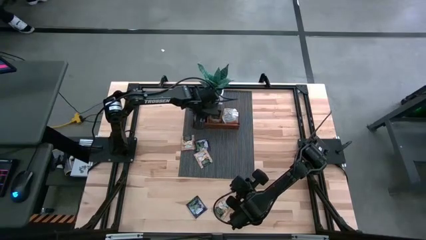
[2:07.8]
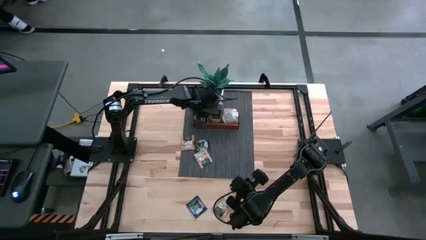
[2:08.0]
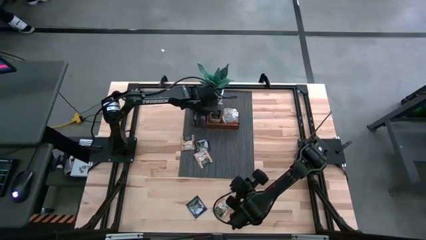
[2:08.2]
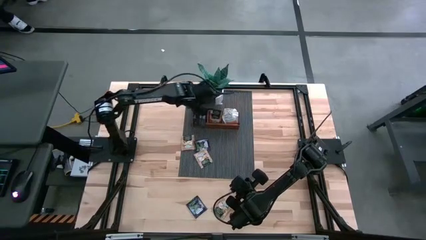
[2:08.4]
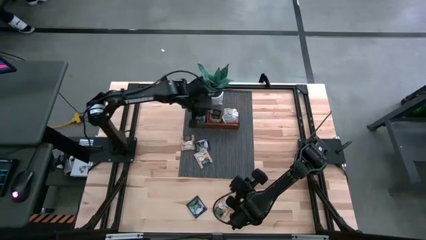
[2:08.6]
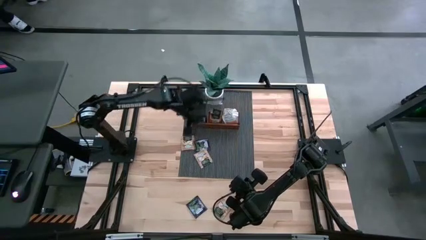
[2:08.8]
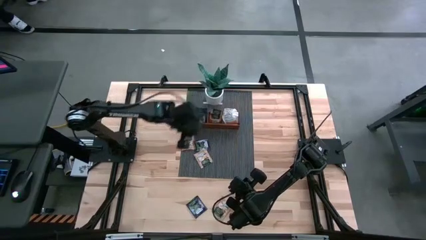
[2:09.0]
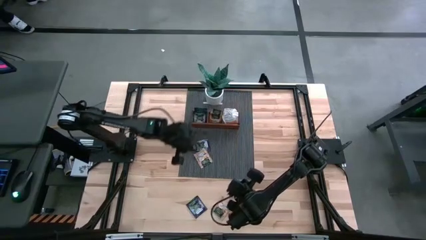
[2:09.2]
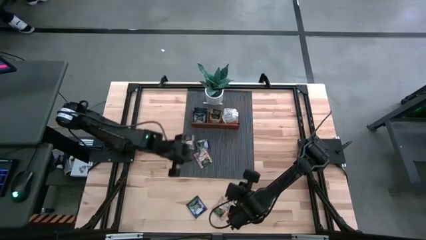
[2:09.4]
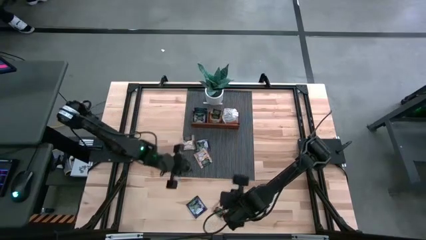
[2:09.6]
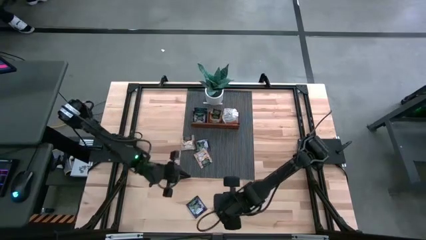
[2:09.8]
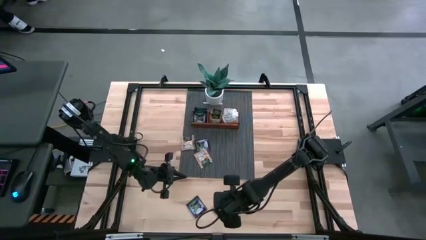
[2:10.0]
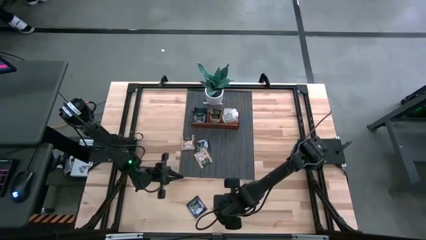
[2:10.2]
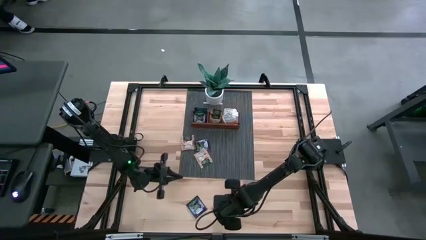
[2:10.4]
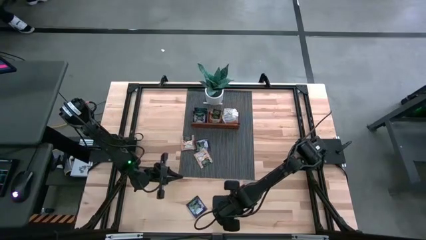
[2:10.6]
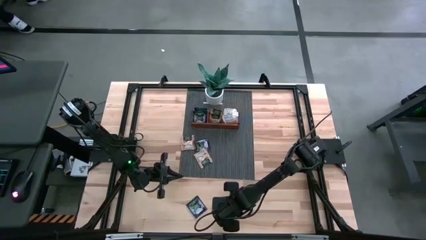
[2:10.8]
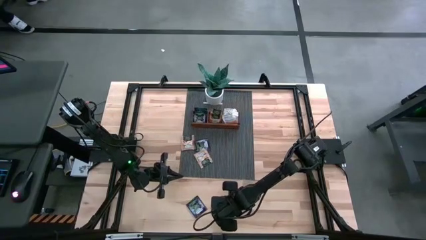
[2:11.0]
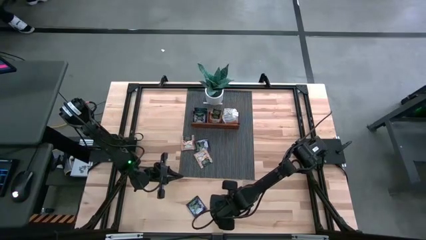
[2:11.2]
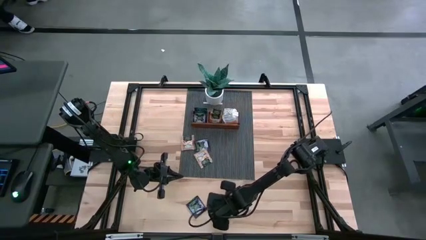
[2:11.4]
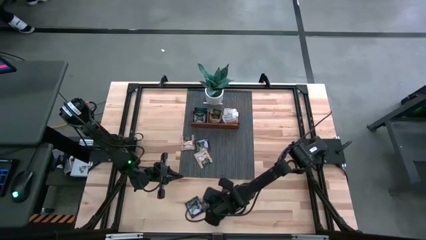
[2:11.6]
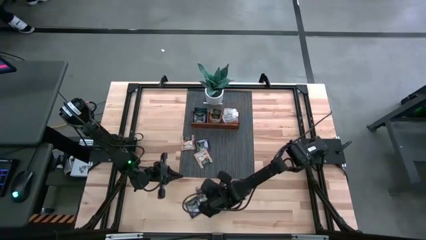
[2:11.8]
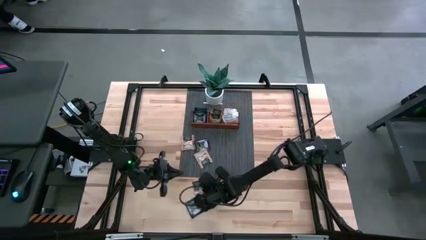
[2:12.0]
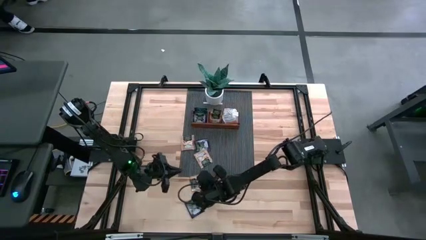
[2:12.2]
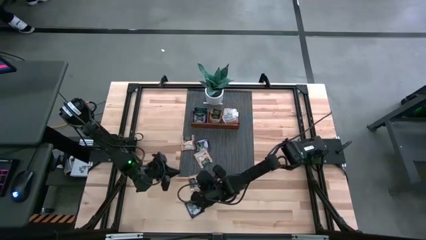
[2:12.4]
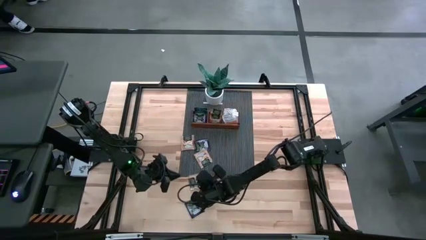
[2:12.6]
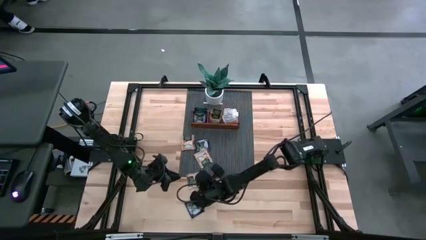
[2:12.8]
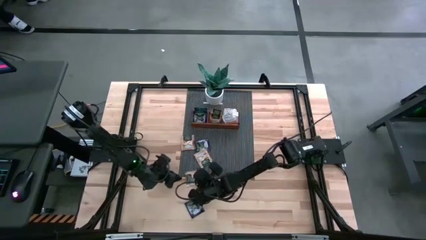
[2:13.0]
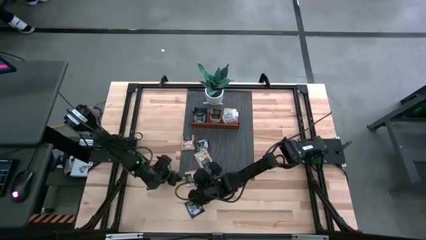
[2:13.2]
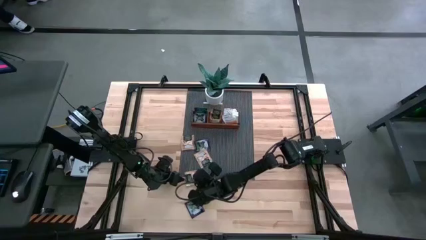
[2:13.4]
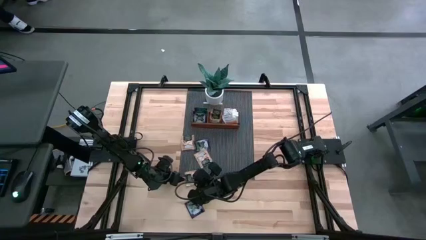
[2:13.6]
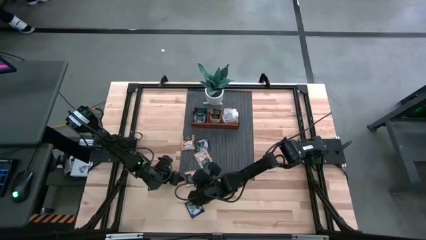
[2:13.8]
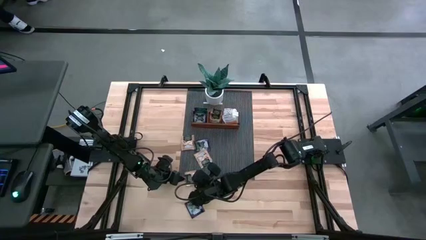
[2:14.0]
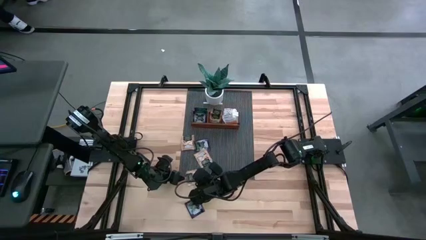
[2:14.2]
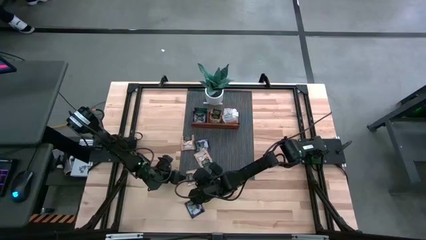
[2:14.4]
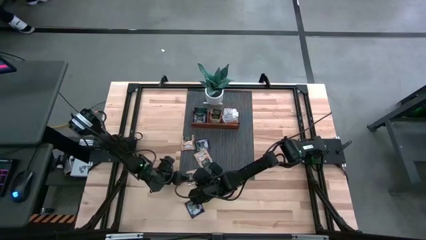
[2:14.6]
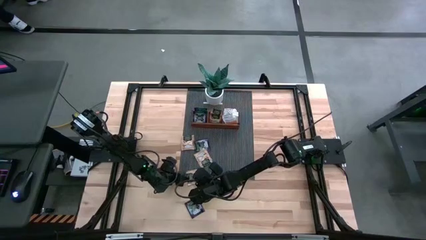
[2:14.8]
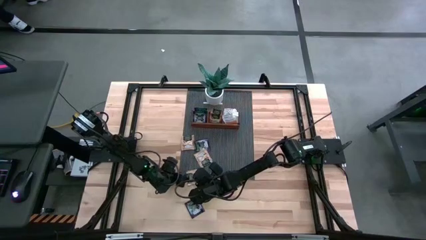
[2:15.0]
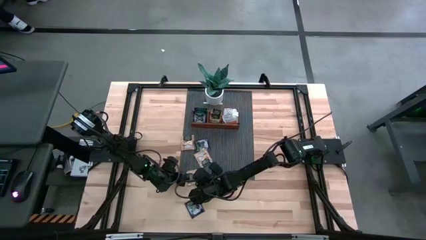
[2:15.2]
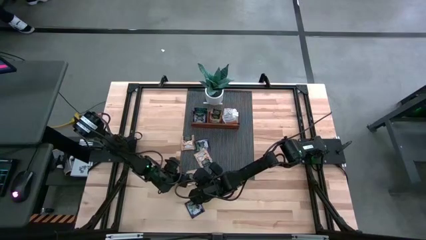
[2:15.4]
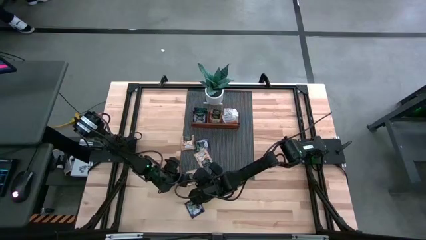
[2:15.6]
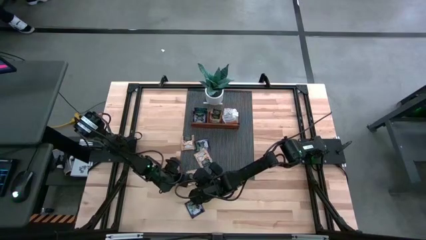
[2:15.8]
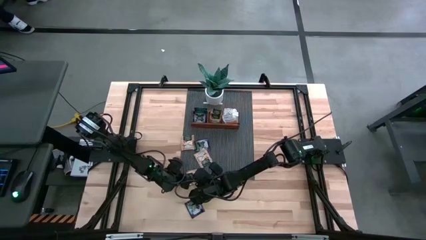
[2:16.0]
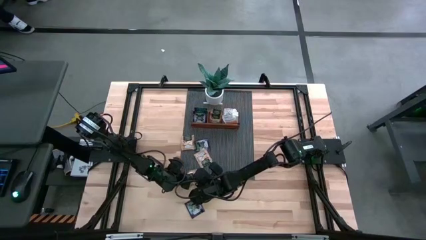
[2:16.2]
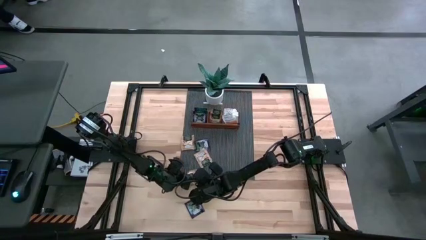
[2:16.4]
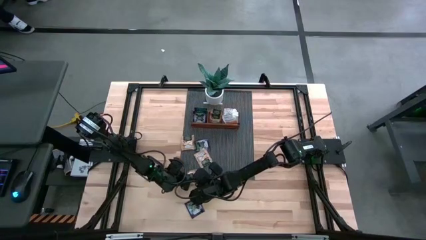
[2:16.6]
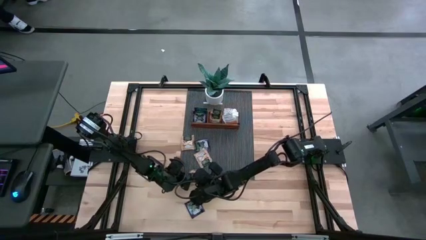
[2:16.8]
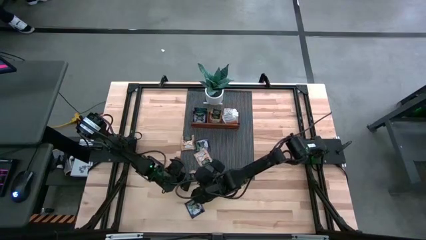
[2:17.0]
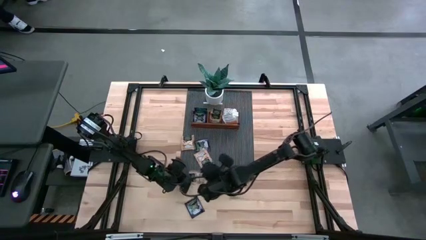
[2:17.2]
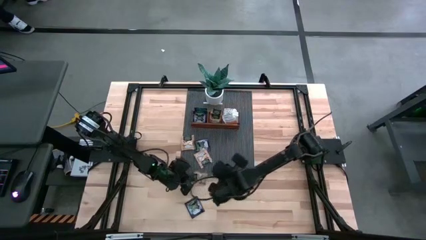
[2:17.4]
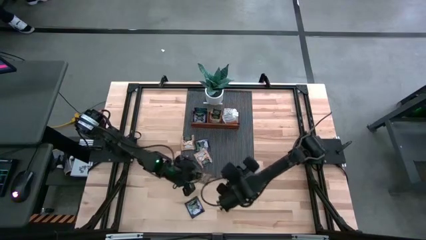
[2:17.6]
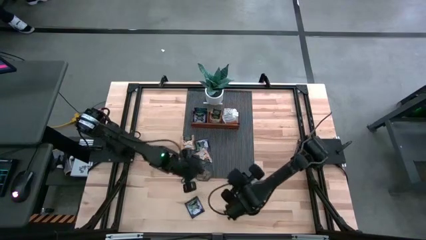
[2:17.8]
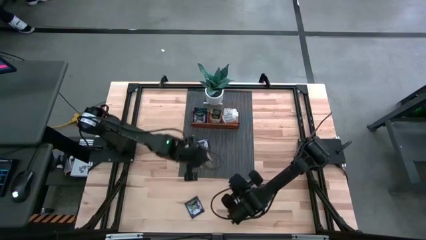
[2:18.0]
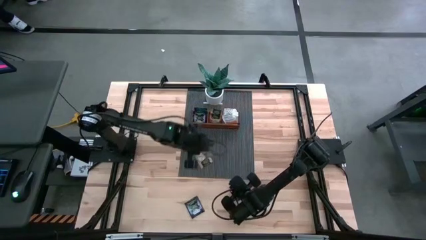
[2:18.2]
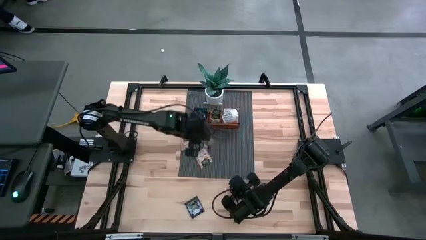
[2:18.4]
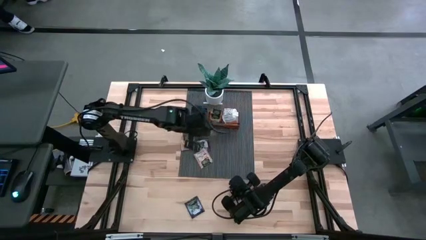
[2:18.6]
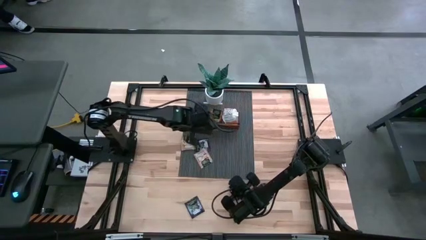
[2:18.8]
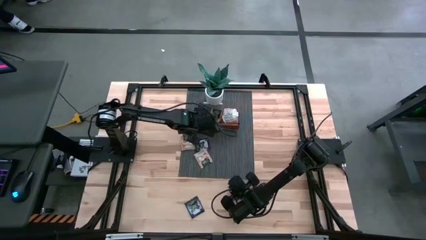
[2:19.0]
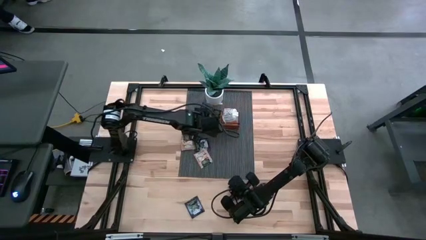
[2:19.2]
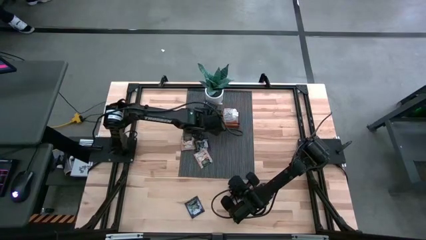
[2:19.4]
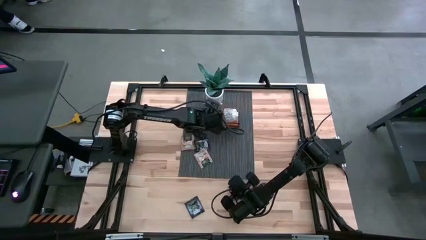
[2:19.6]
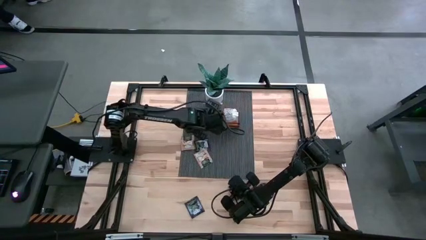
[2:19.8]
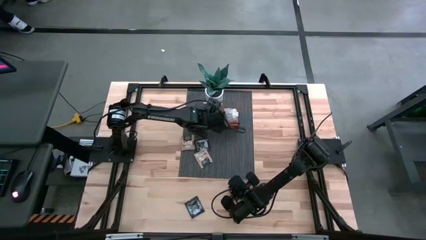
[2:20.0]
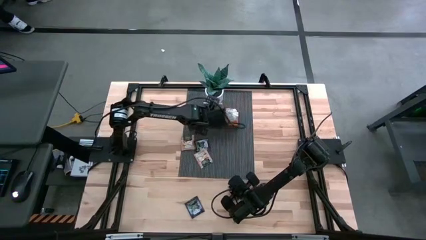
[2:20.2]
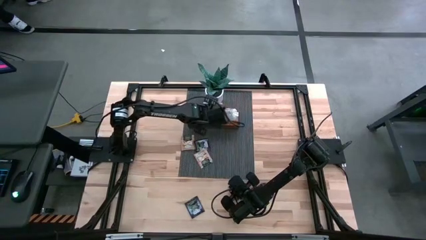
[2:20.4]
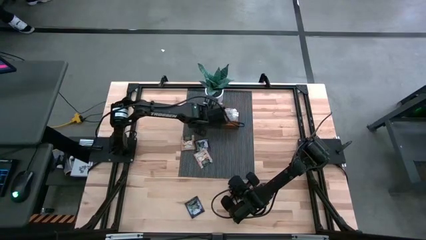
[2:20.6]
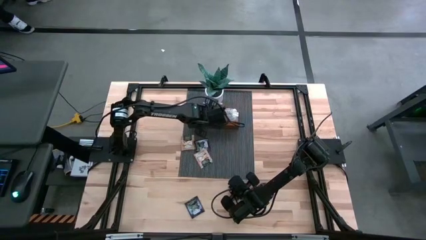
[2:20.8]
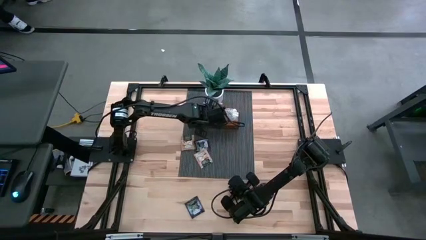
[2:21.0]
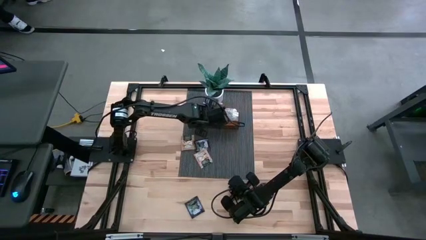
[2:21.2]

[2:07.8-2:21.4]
Task: Pick & Place Tea
Put the brown tea bag into the middle section of the wooden organizer

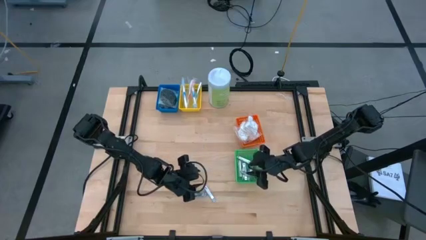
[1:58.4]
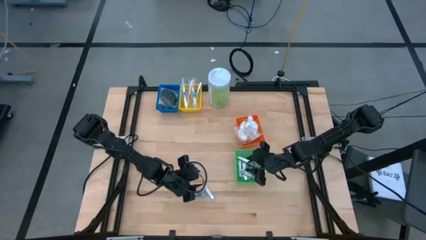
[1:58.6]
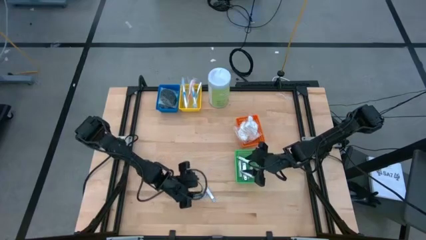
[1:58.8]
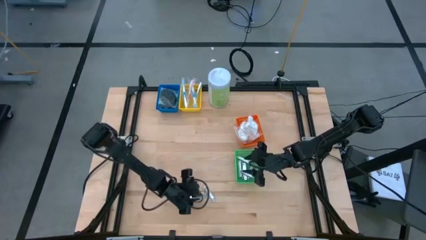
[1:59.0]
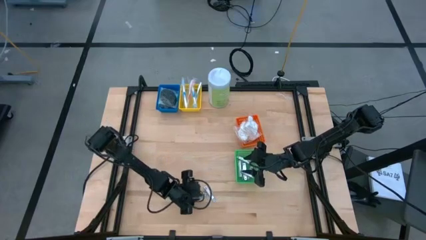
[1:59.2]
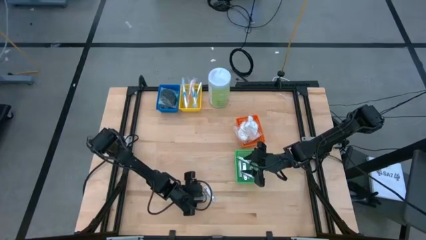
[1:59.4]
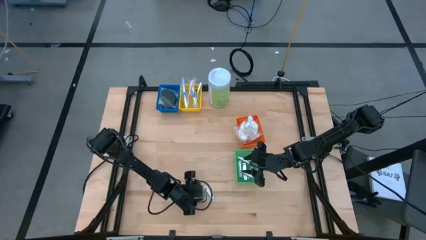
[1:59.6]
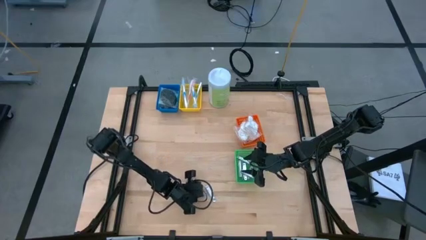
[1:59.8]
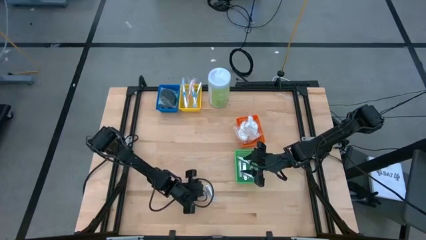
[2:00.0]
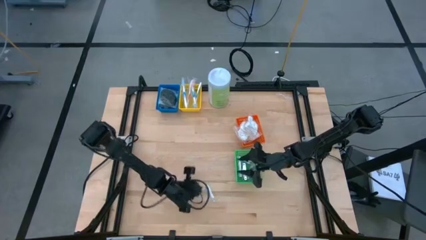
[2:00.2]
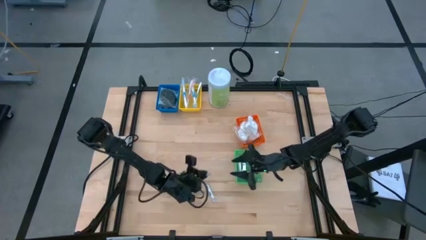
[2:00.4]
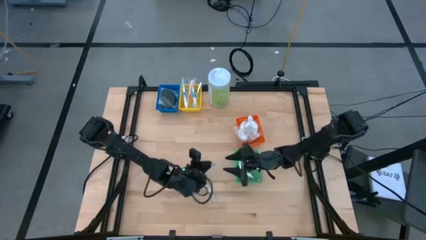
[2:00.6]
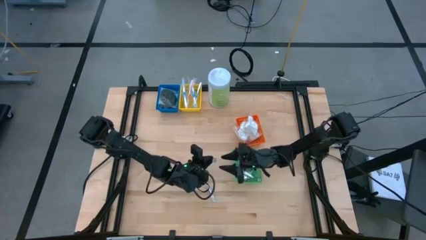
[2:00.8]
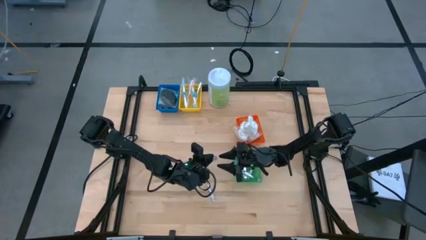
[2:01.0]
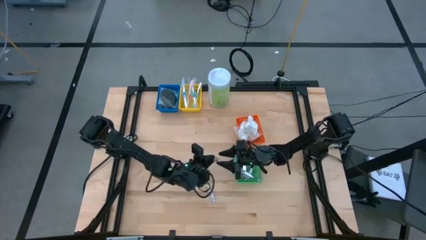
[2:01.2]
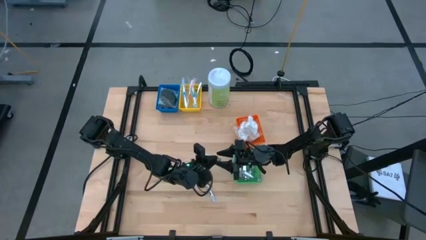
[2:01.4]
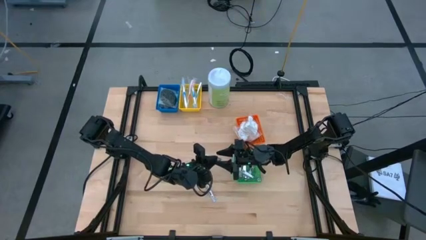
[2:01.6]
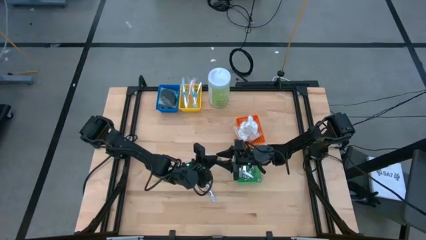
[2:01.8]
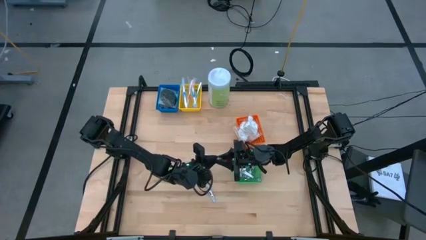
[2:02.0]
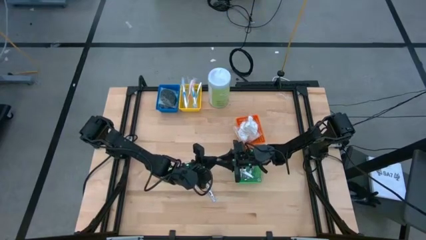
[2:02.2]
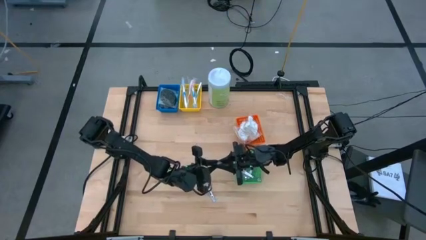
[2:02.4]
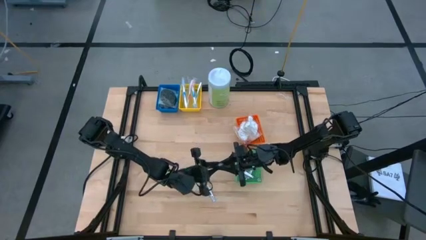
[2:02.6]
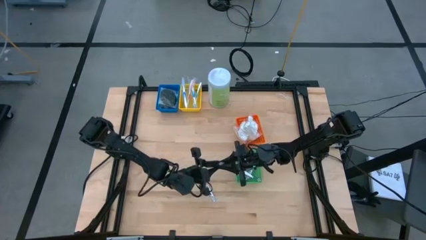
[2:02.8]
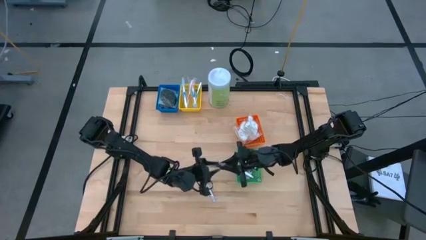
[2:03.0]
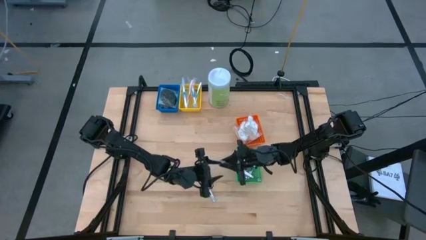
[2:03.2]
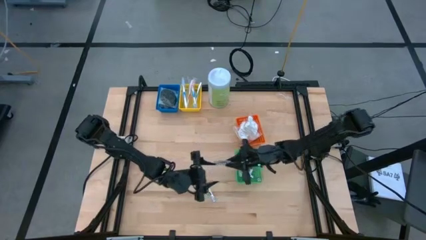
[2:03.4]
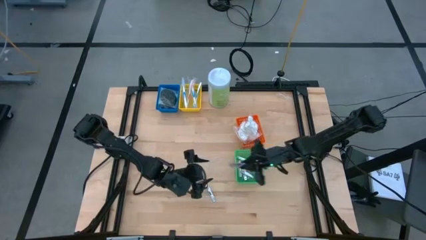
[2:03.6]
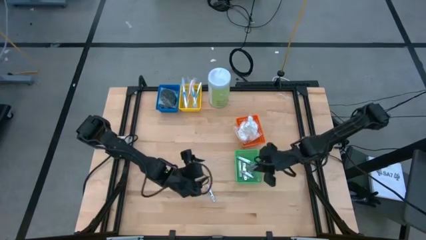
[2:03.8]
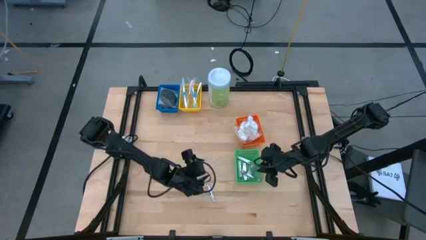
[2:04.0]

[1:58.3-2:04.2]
Task: Pick & Place Travel size toiletries
Put the nail cutter into the green bin
